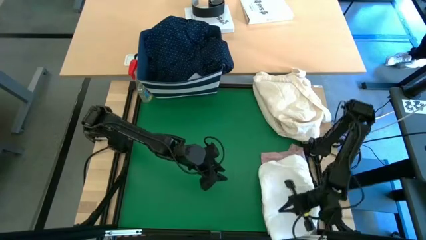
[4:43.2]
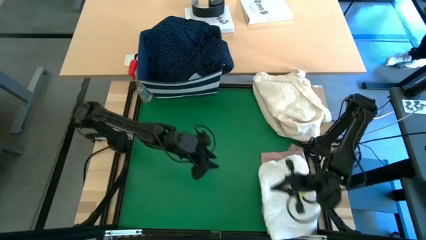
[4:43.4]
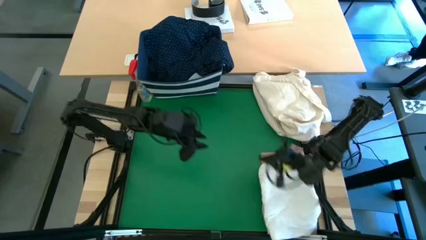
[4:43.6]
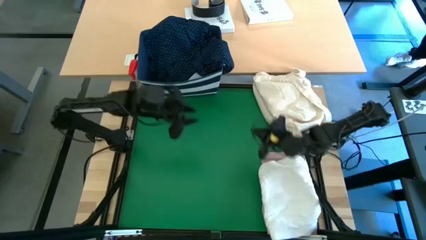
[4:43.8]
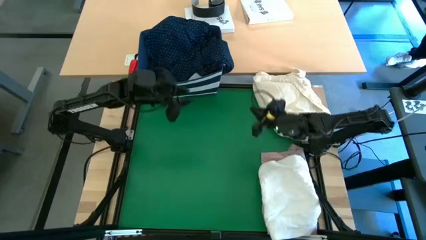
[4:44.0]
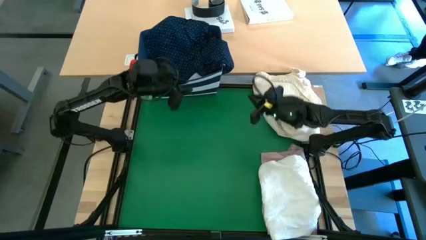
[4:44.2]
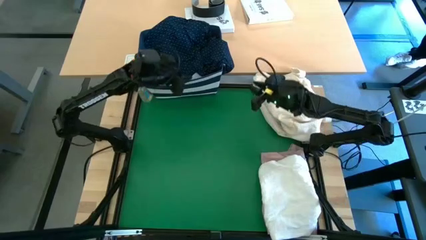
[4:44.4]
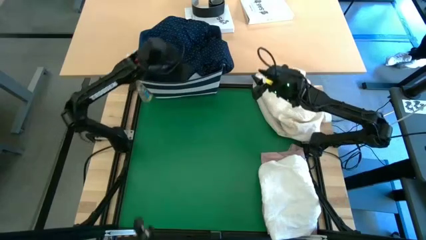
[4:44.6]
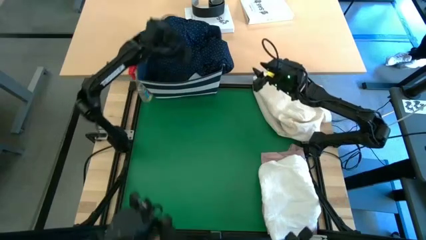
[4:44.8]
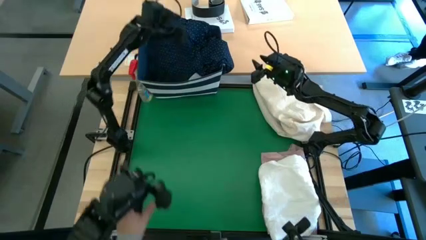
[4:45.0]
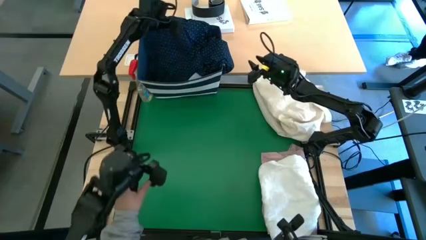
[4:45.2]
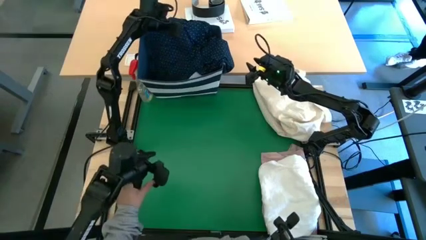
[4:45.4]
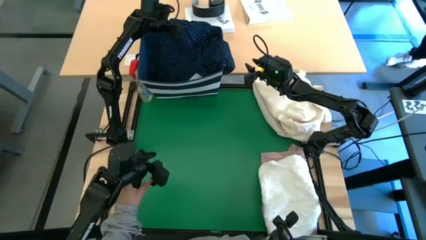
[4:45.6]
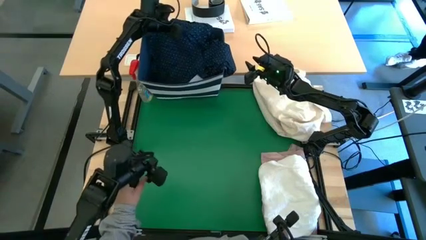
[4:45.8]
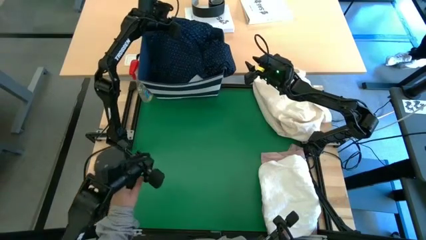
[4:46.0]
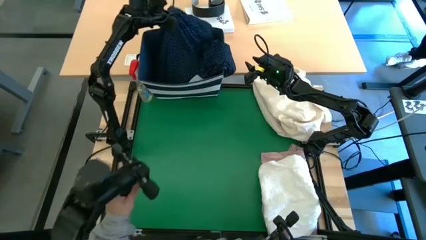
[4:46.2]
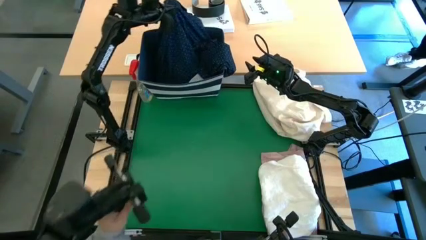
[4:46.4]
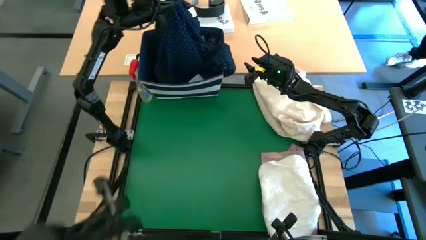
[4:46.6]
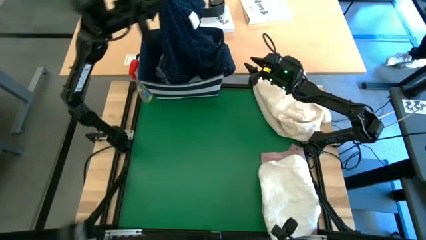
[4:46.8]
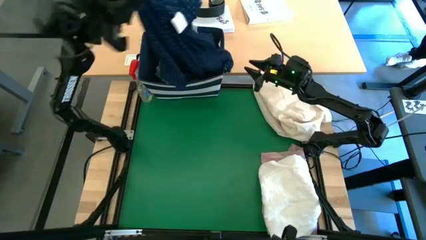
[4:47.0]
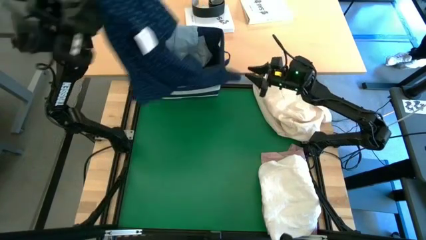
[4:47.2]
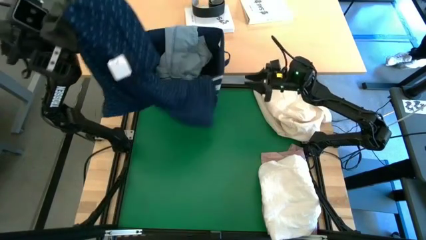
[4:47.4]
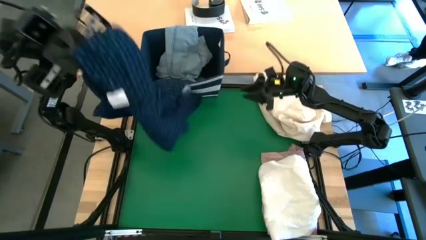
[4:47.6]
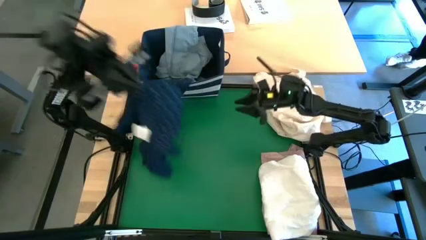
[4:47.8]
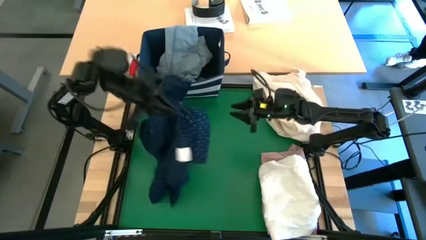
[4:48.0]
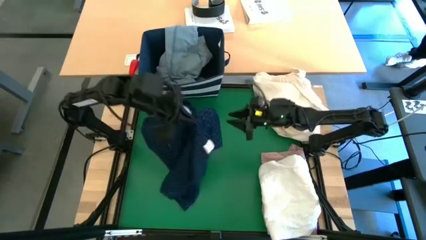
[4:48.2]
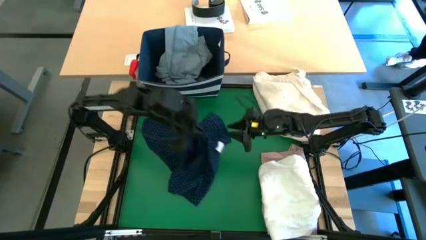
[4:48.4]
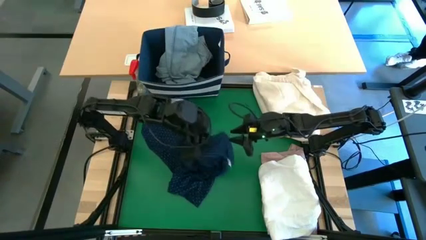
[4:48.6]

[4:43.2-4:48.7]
Task: Fold laundry
Remove the blue polo shirt from the blue laundry bin

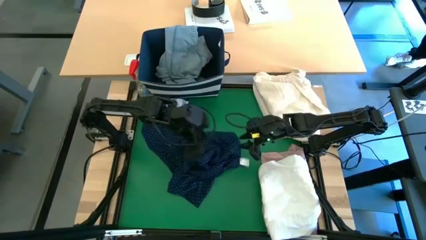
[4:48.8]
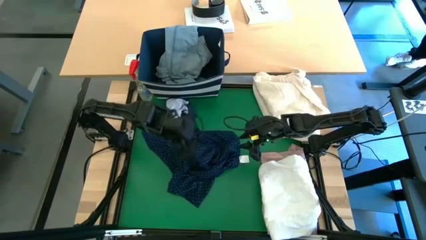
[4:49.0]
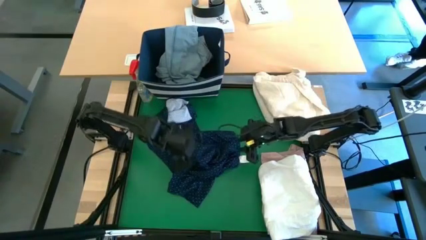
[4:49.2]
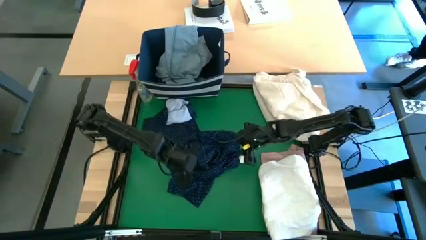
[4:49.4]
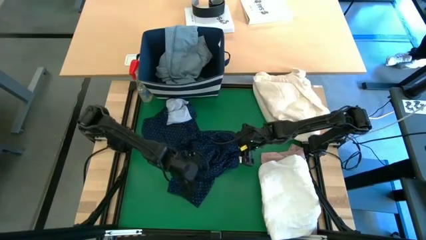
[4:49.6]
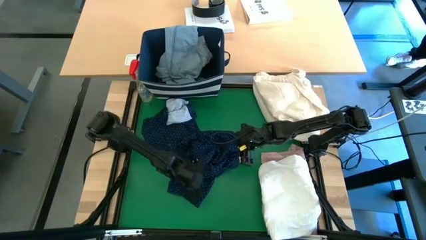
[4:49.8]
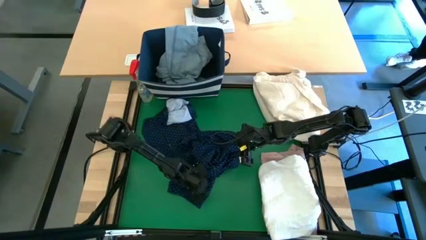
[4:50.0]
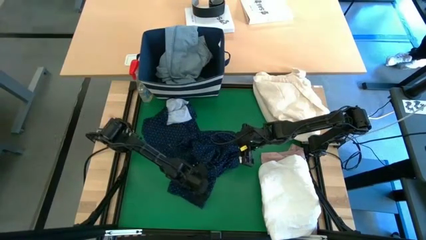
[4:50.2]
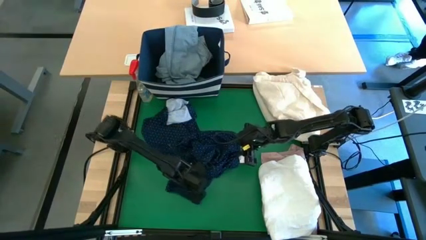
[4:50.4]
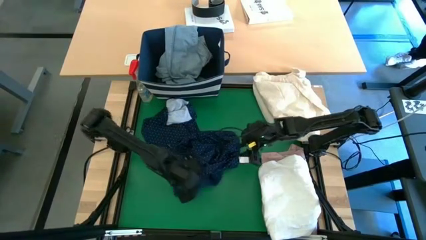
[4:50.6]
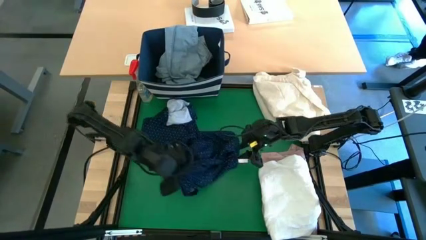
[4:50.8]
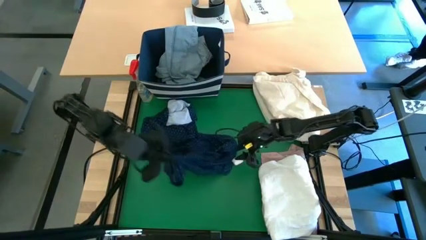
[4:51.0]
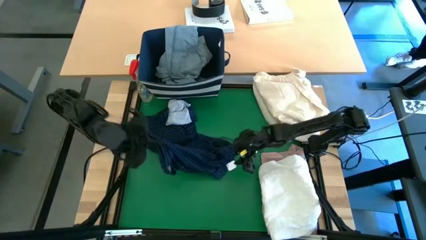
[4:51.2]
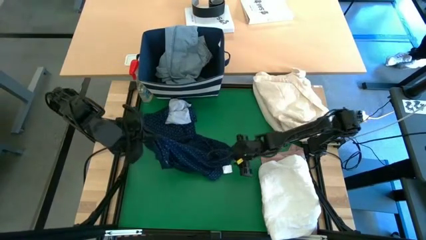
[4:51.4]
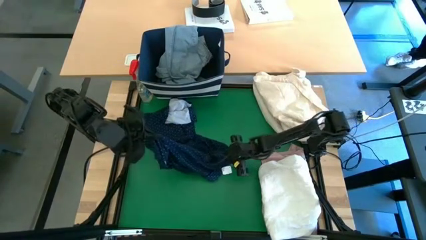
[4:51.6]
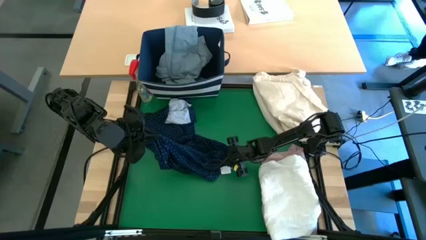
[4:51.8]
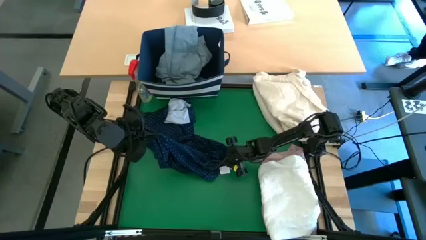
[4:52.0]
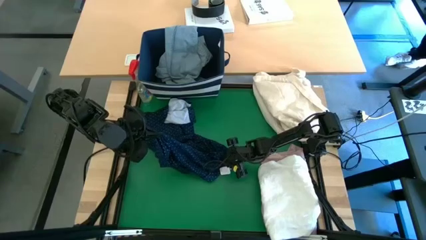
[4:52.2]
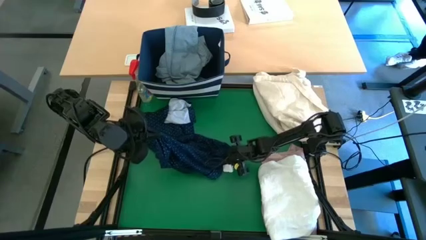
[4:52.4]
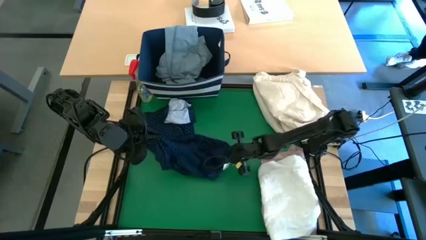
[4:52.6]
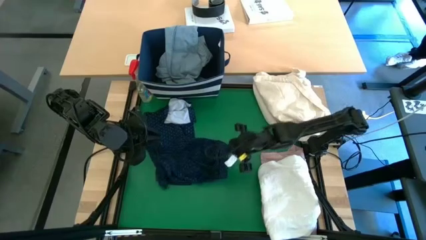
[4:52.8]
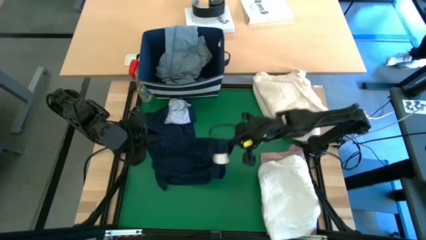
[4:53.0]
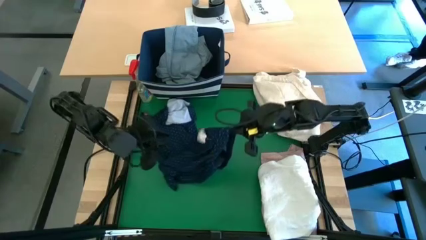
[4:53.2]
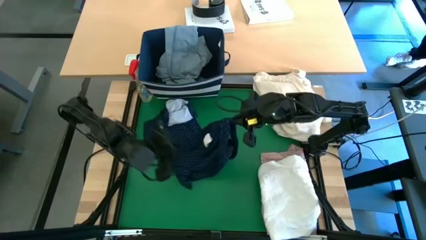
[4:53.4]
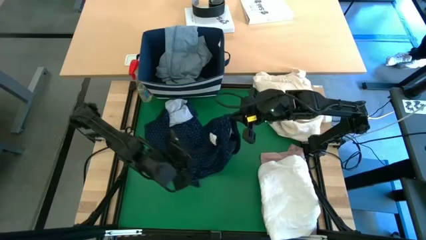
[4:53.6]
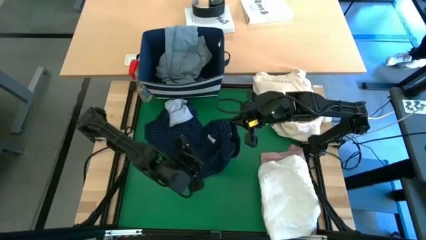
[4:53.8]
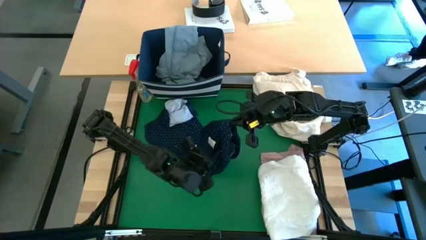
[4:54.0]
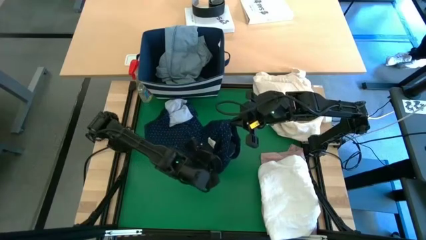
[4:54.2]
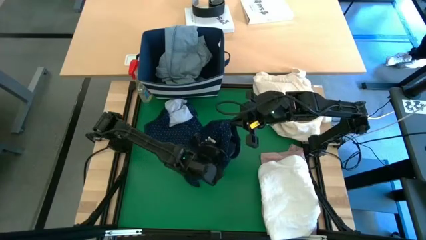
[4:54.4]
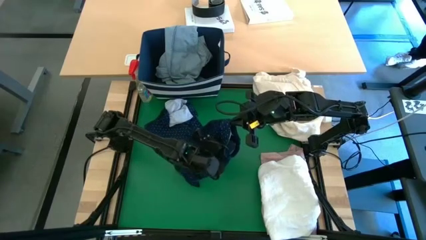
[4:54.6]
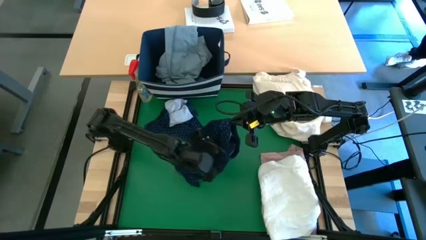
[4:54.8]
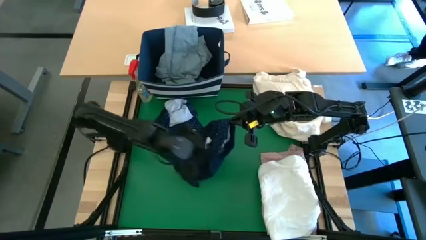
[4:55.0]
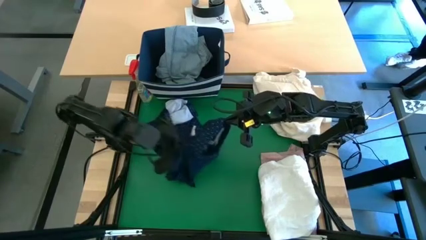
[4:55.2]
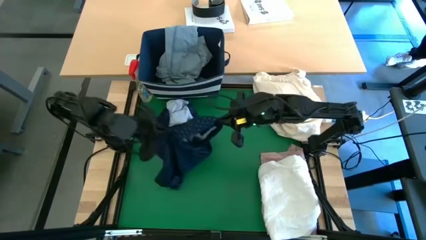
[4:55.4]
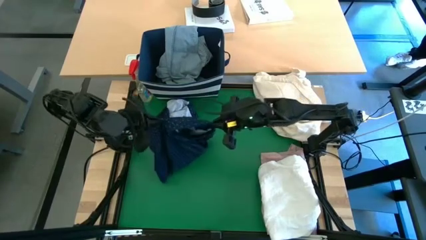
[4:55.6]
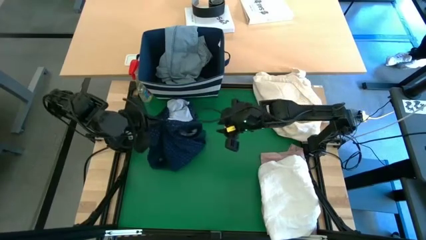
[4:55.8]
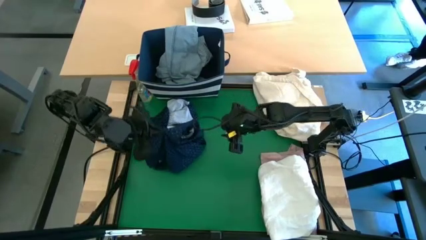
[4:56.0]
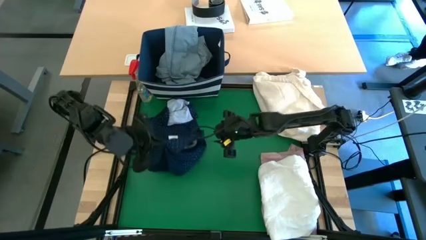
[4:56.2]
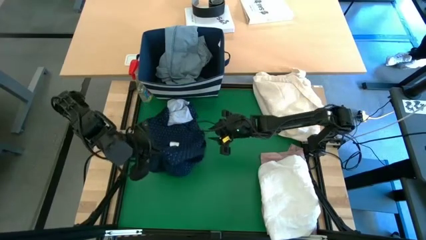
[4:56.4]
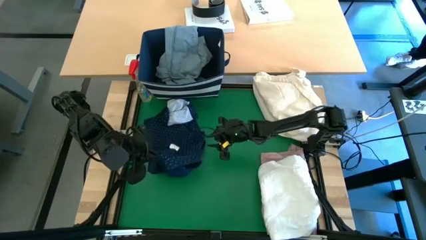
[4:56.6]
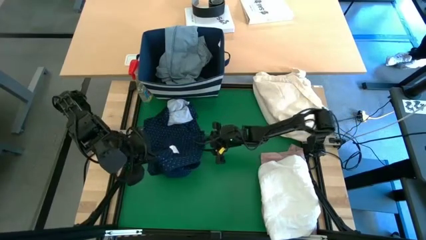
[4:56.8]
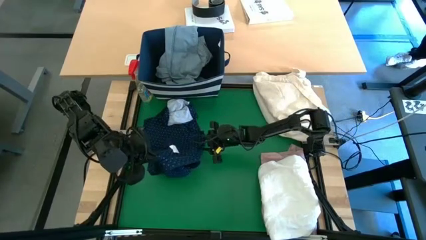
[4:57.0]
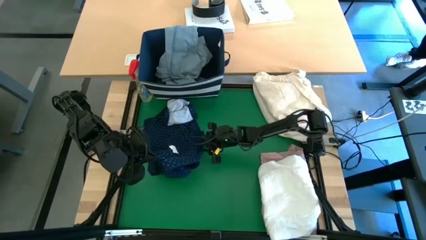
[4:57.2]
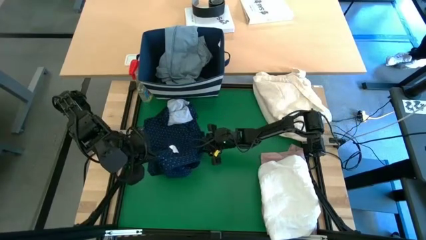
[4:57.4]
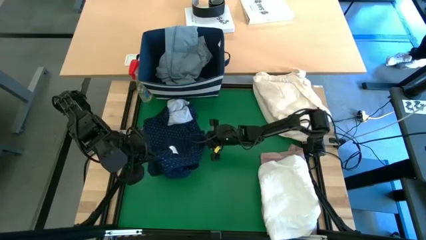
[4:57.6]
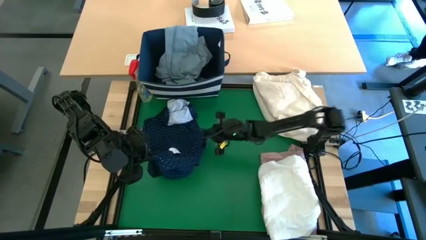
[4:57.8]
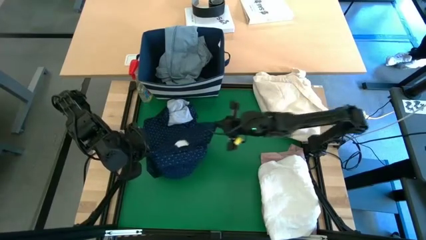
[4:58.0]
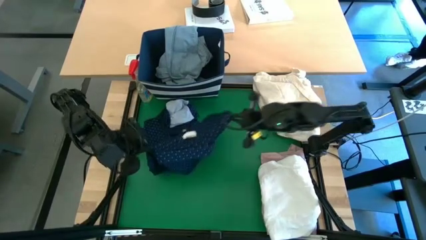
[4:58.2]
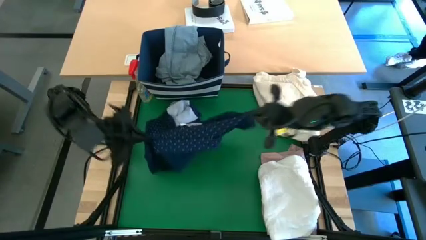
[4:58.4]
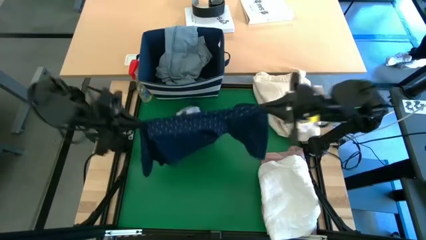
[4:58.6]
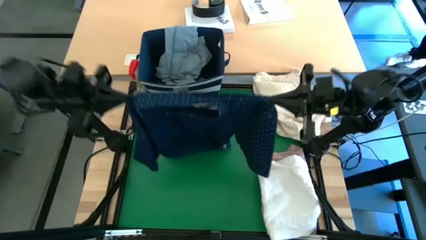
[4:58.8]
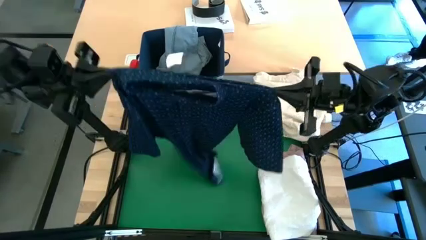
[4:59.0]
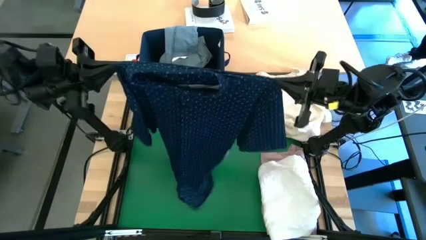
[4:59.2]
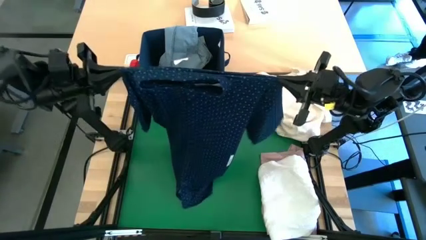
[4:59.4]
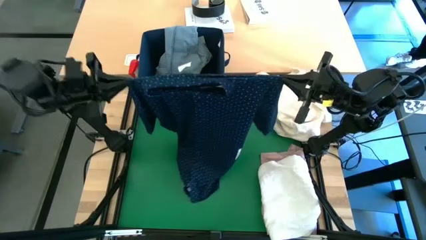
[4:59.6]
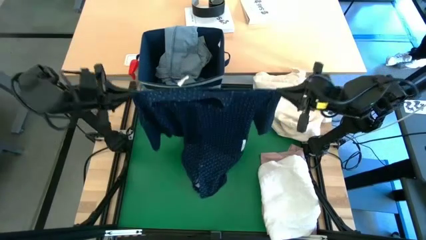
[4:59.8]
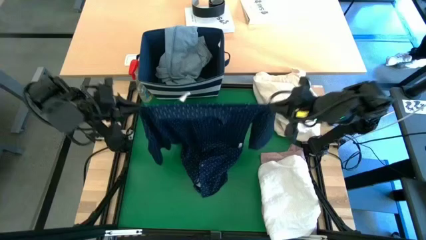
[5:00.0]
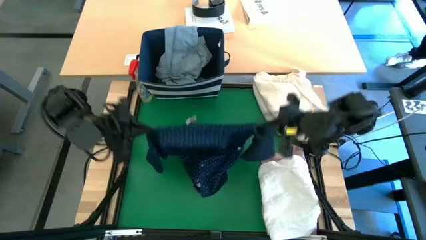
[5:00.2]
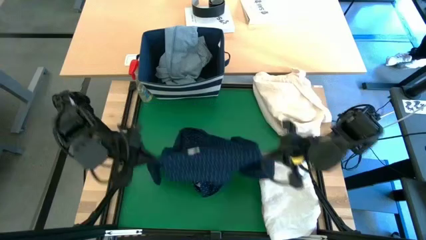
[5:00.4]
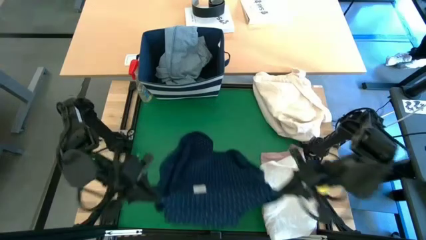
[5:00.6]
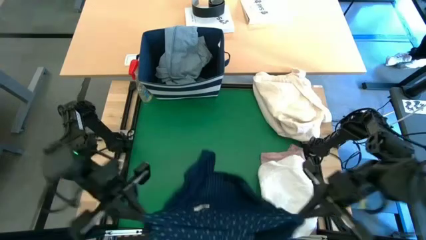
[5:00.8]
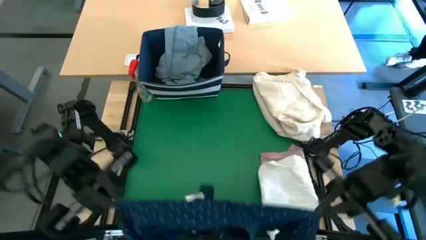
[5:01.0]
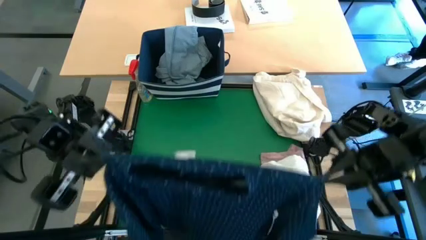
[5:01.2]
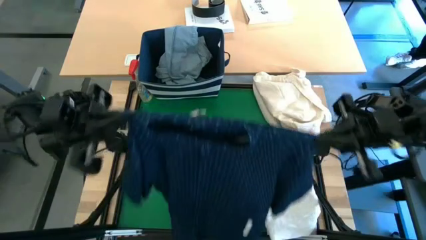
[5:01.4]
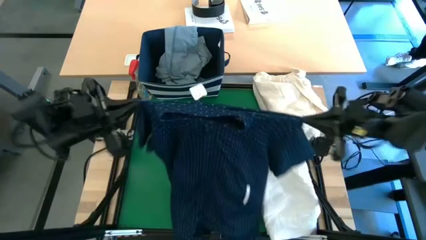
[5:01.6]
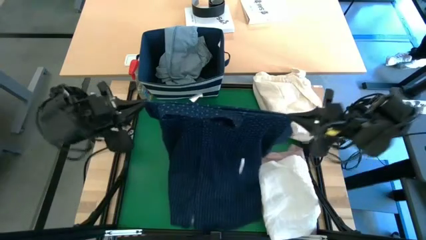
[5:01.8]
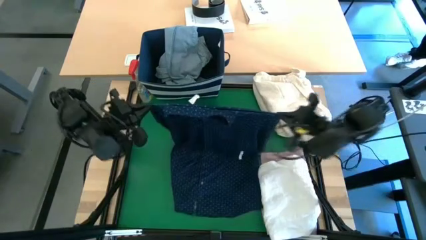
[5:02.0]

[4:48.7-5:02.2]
Fold the blue polo shirt
